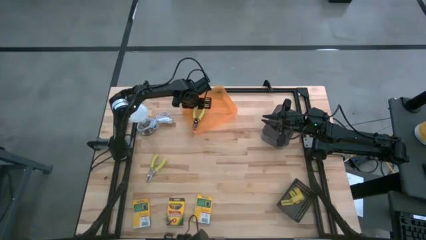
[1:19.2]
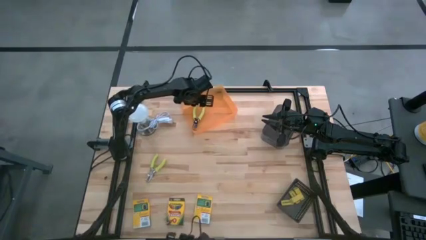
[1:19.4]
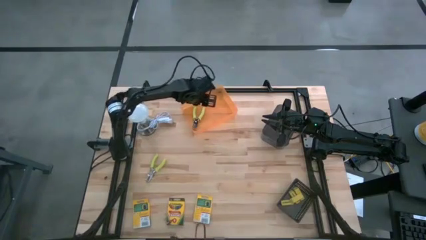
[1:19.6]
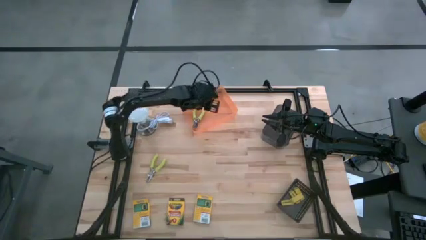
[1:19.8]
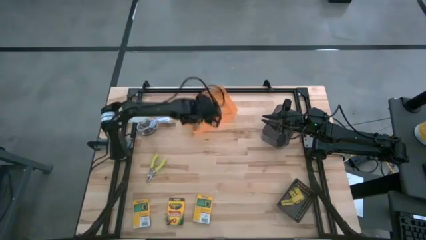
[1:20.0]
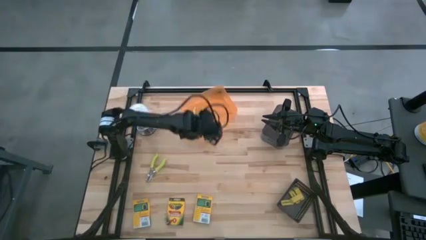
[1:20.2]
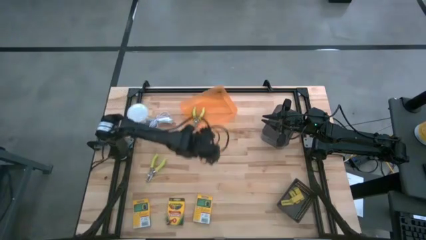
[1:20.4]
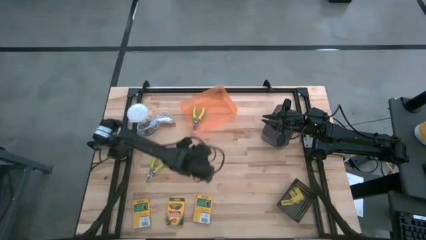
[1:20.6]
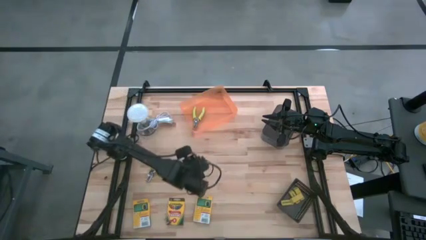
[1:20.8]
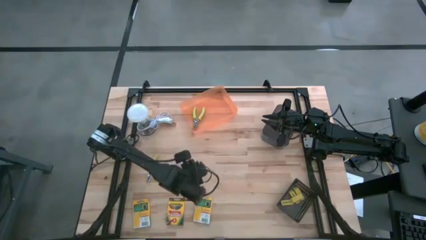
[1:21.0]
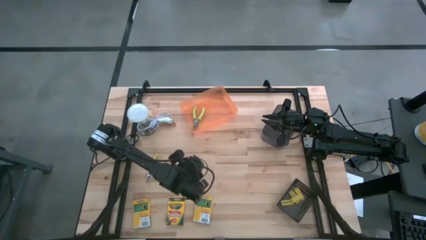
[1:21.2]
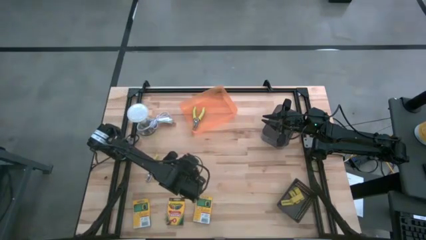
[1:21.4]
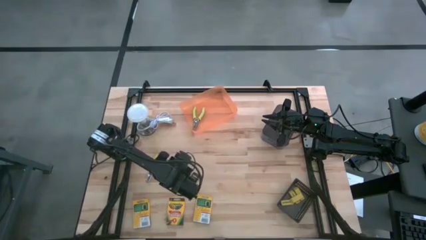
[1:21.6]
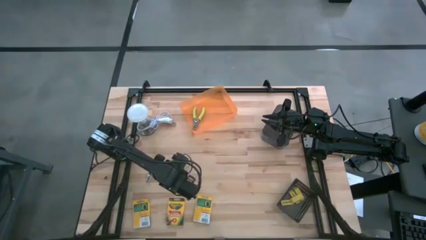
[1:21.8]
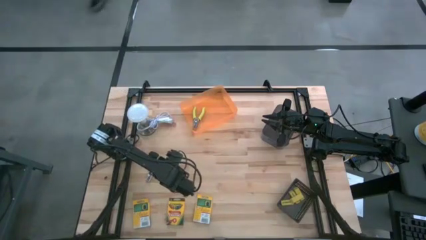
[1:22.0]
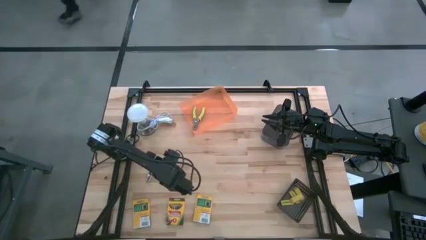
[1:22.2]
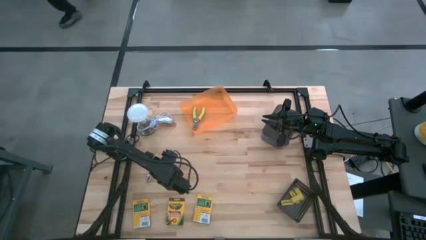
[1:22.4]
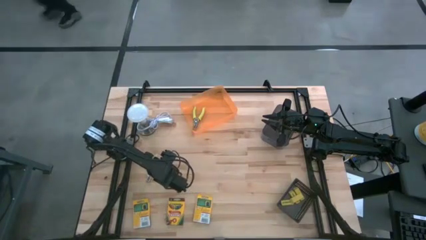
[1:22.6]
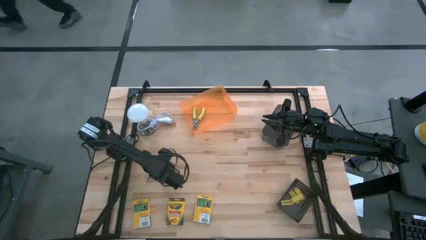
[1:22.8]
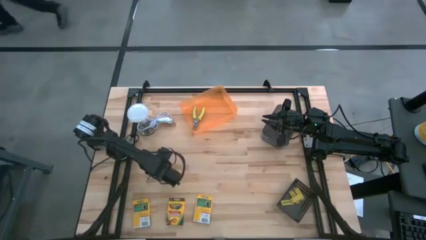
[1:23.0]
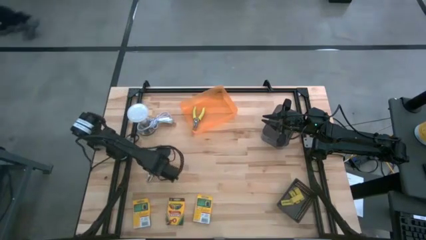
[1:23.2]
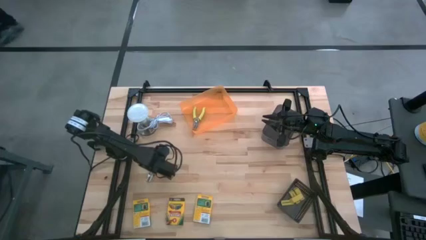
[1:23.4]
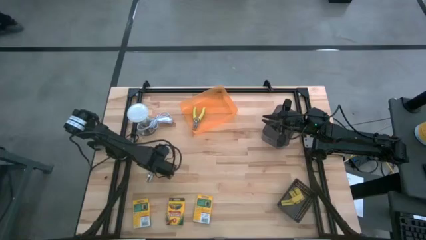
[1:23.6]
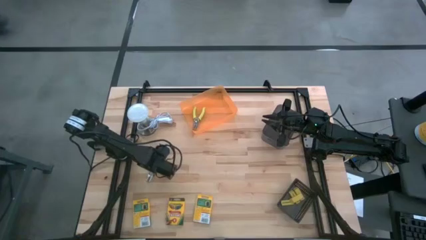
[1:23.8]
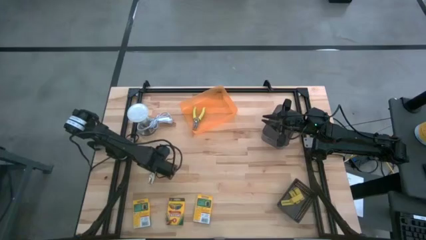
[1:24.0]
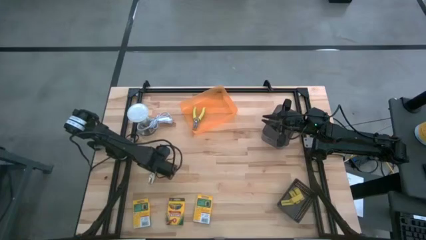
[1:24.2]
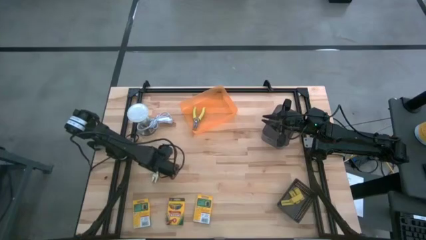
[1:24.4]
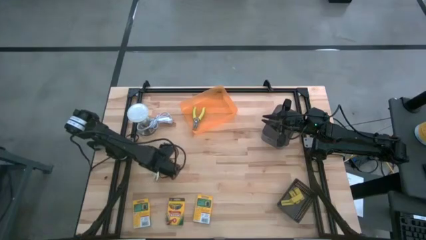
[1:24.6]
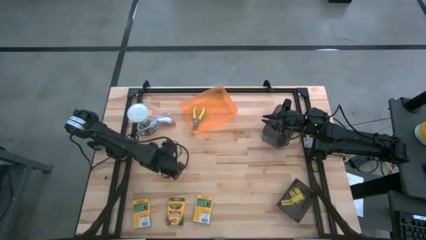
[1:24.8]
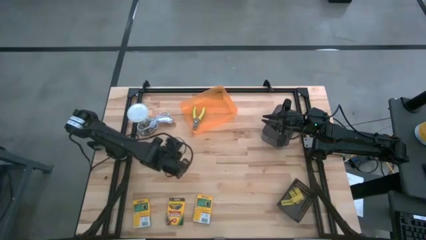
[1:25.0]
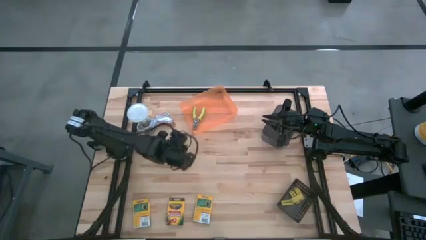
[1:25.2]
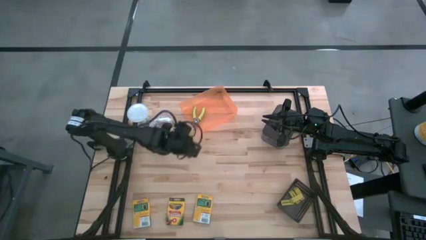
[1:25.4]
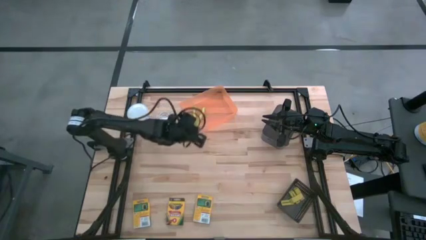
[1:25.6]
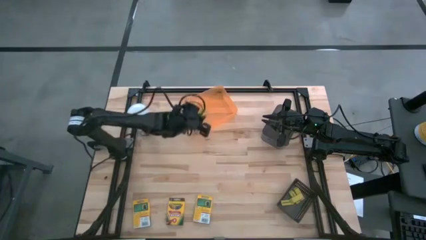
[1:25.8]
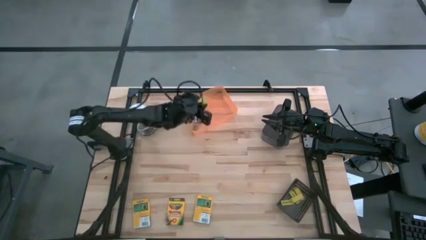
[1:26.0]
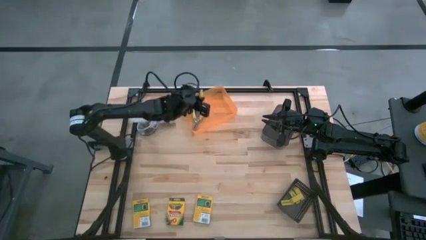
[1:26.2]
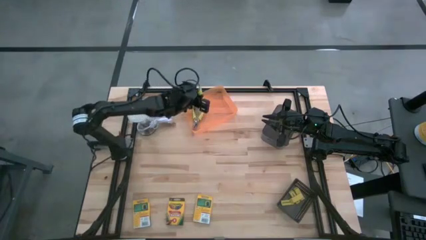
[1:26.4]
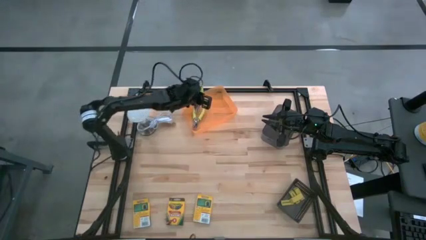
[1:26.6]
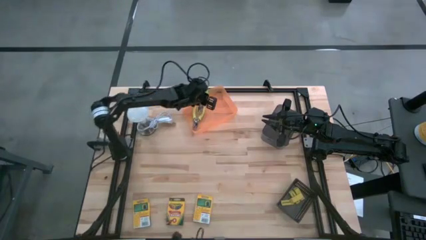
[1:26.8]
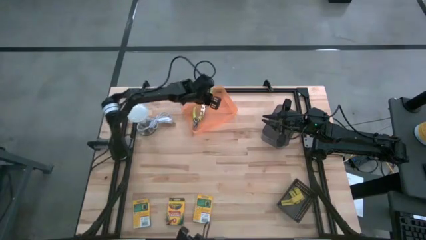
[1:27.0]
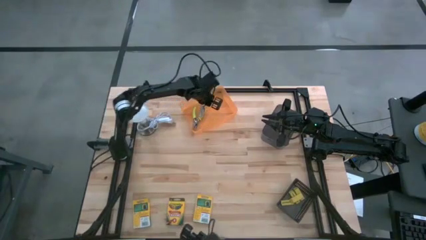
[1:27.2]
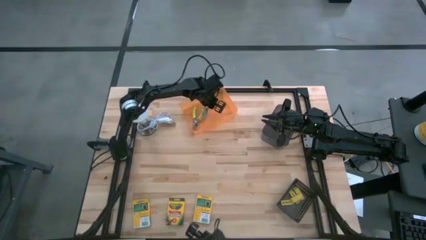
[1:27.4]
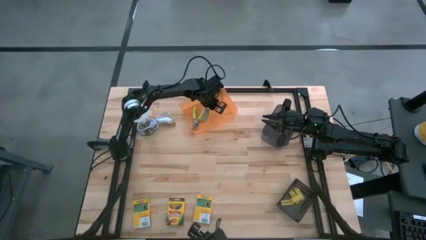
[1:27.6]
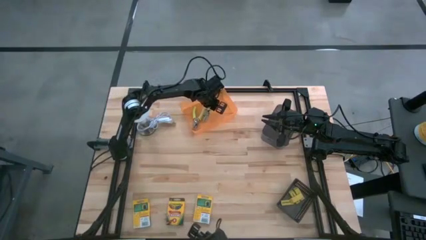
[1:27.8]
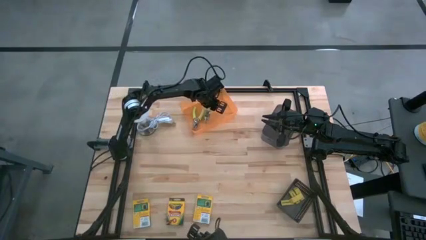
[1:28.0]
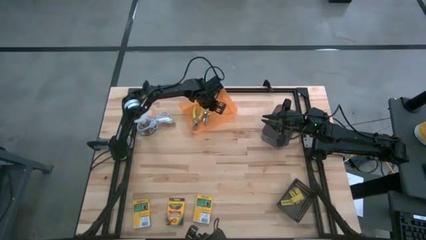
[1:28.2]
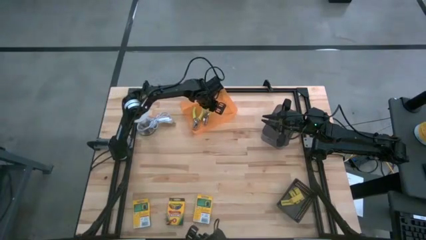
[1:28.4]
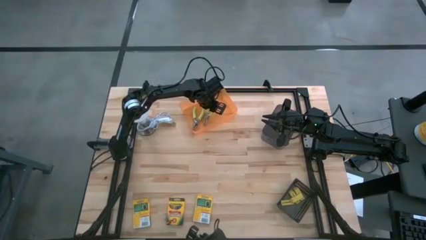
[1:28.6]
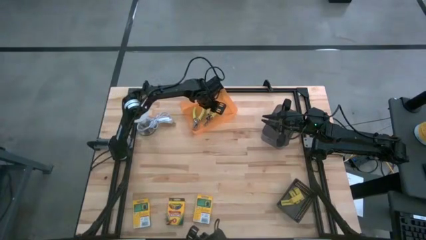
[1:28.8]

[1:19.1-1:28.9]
Task: Pick & Place School Supplies
Put the yellow hole puncher into the orange bin

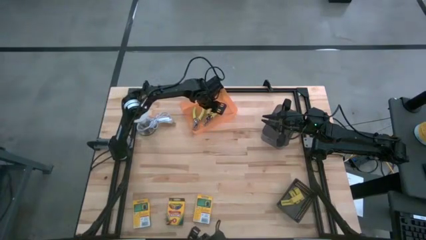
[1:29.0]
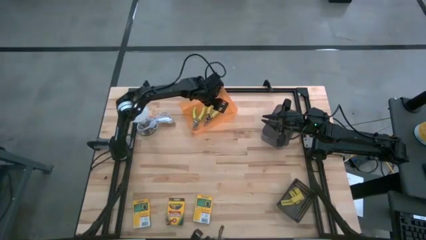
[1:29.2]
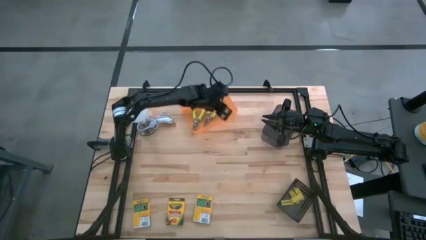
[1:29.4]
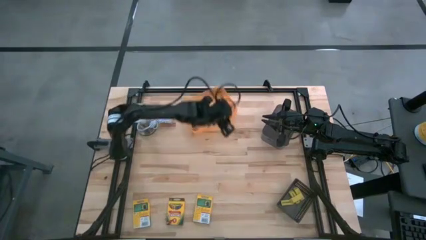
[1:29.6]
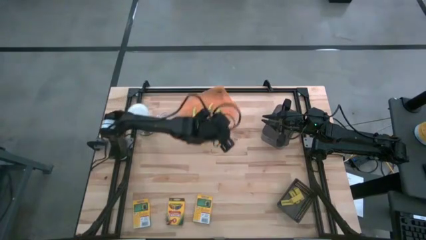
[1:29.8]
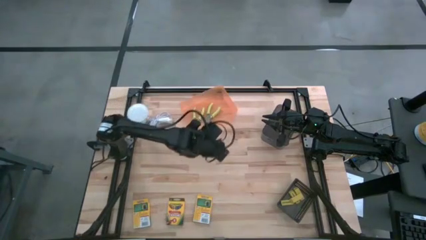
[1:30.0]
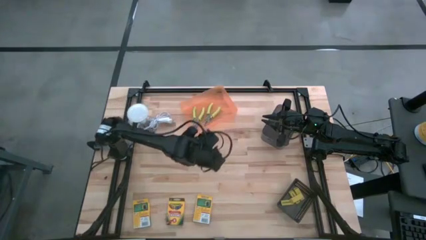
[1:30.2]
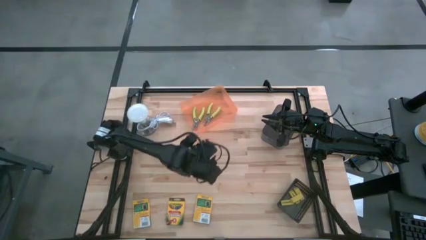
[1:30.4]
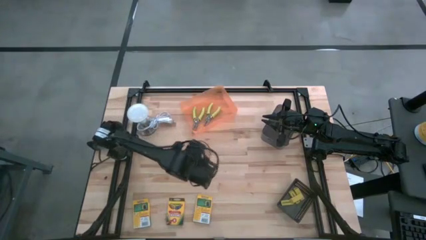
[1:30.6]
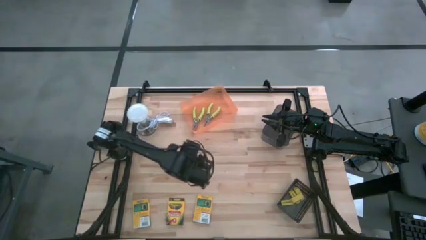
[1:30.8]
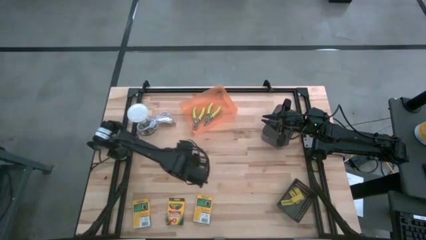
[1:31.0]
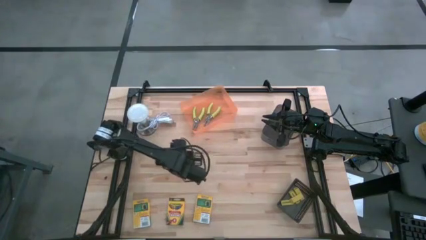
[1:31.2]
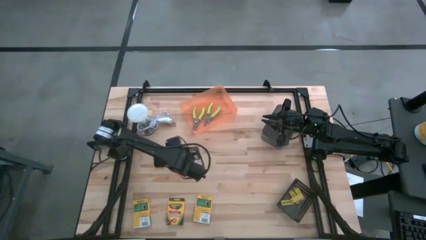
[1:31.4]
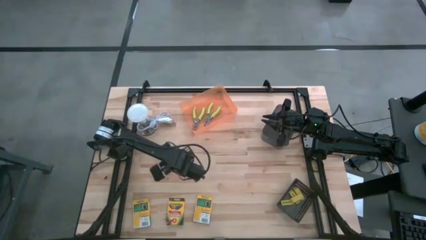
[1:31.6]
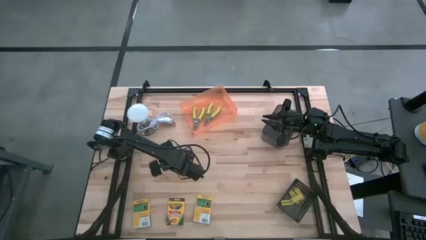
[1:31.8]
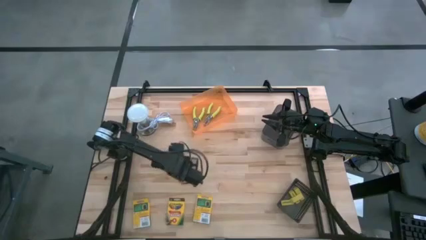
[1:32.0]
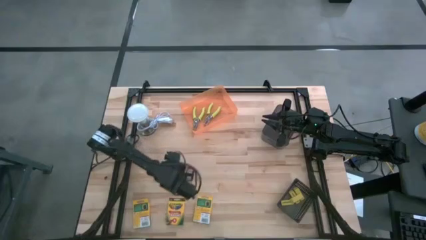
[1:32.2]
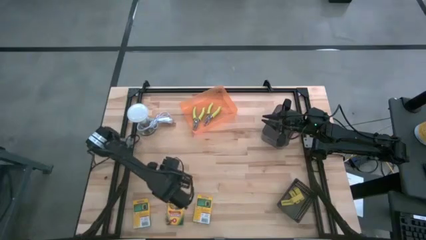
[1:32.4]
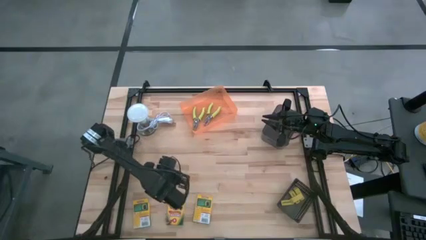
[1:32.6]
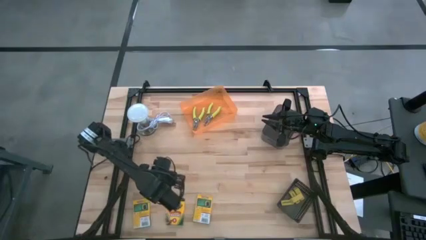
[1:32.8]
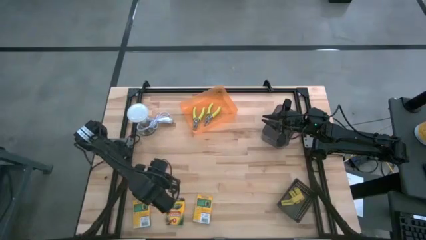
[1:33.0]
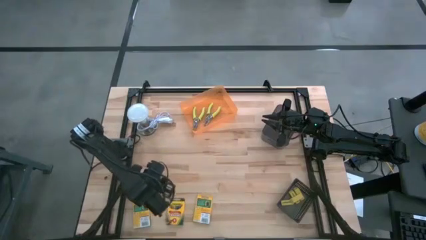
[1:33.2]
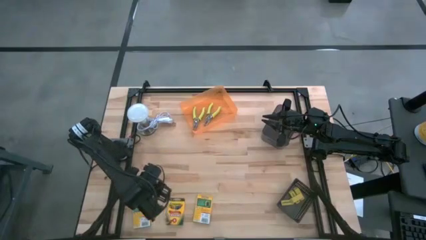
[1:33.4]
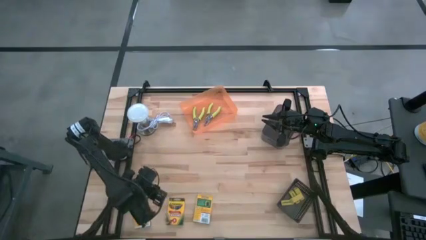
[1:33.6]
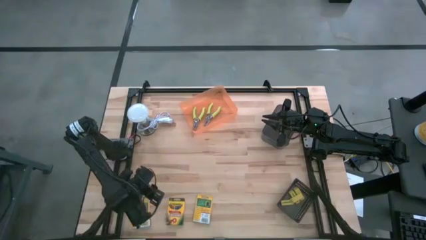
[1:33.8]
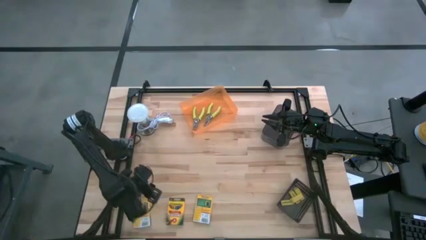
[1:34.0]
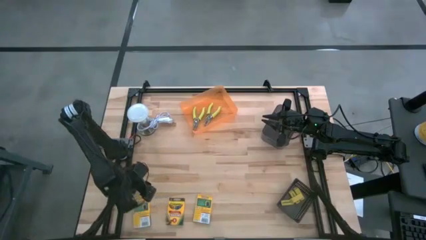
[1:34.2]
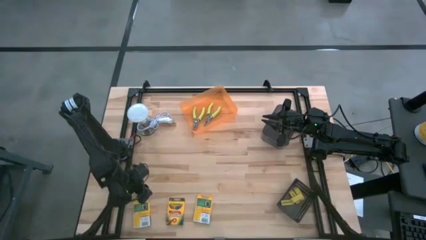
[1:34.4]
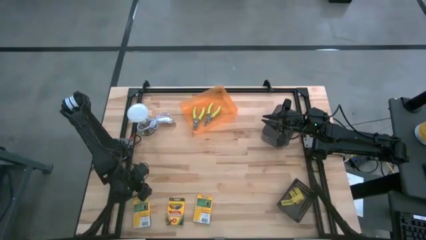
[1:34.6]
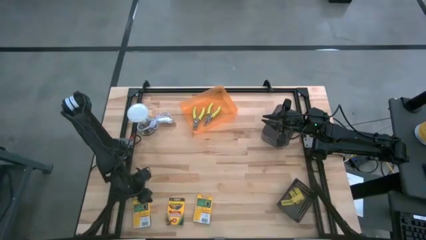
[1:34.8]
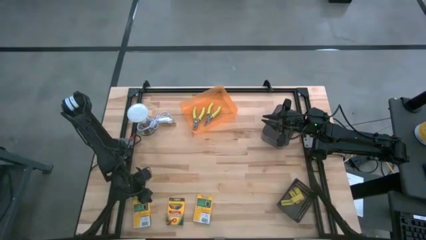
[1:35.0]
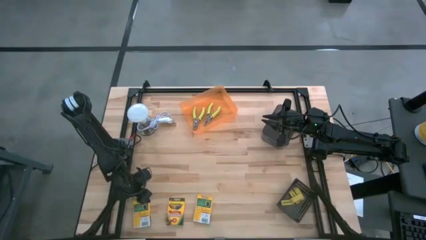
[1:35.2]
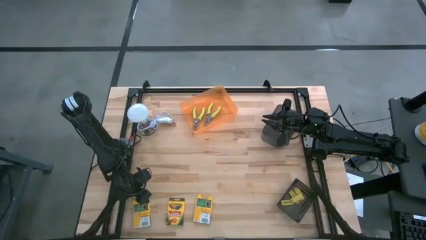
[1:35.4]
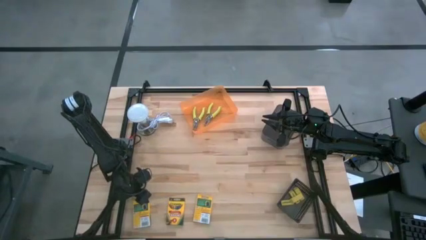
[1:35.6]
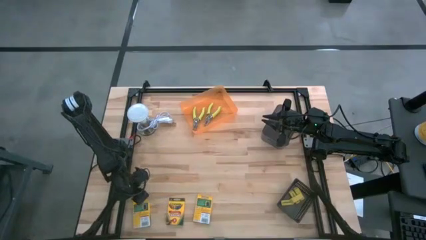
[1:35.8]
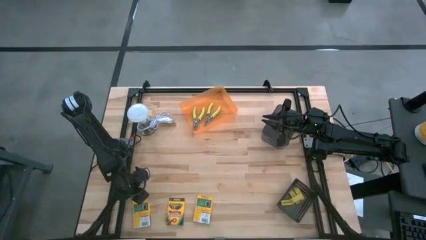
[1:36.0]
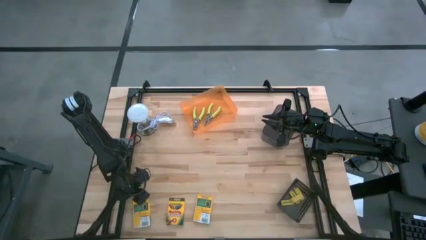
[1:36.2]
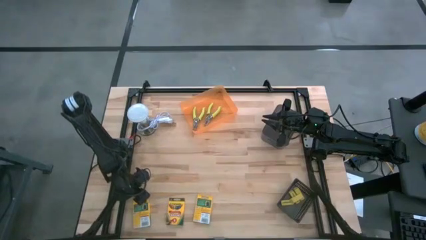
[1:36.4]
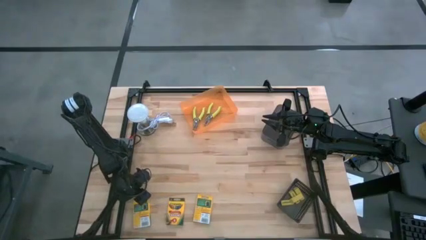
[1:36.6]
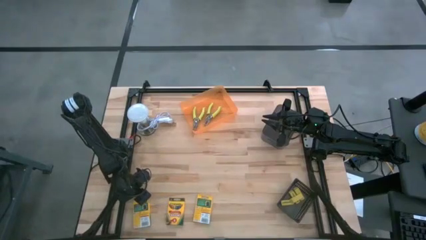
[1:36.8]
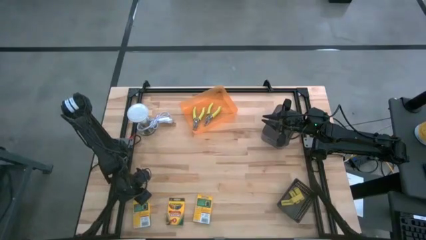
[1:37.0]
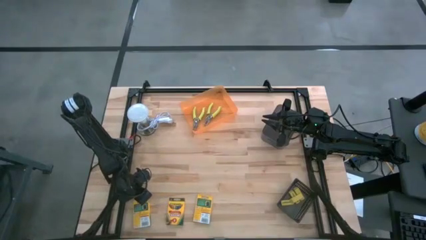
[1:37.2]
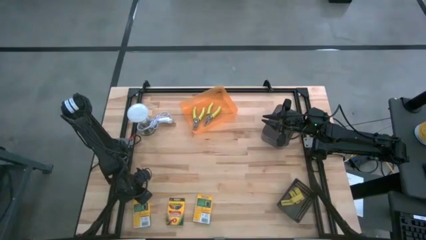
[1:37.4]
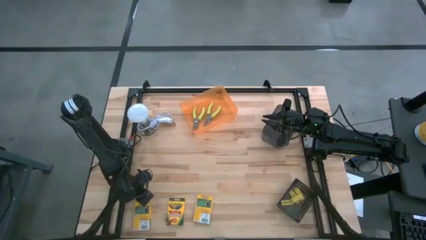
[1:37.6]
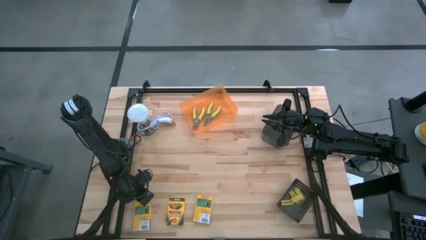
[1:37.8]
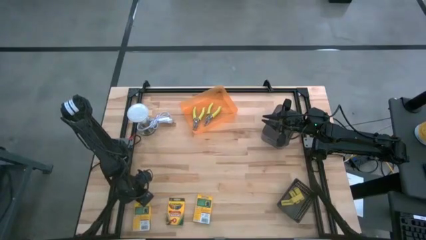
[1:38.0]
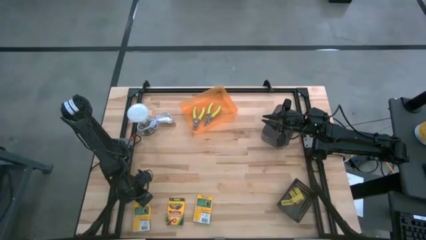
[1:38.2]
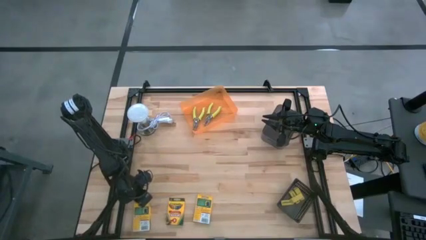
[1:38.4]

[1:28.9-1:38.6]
Put the crayon box into the light black bin
